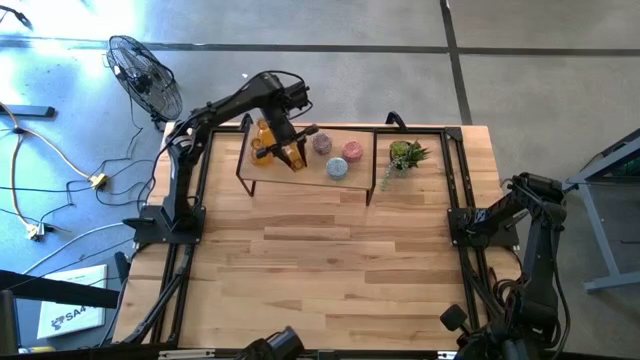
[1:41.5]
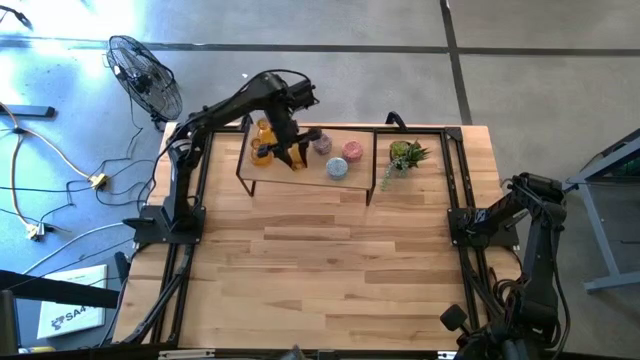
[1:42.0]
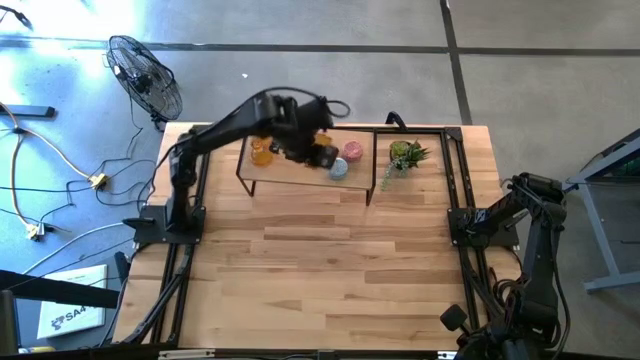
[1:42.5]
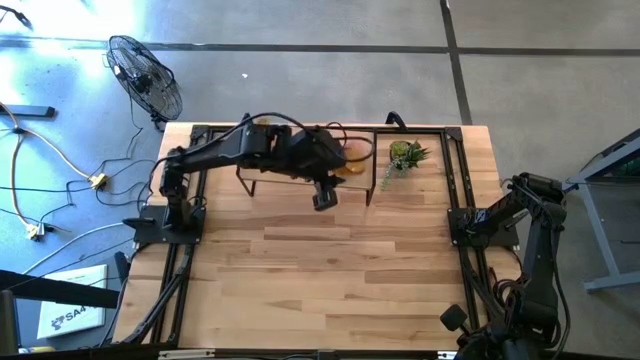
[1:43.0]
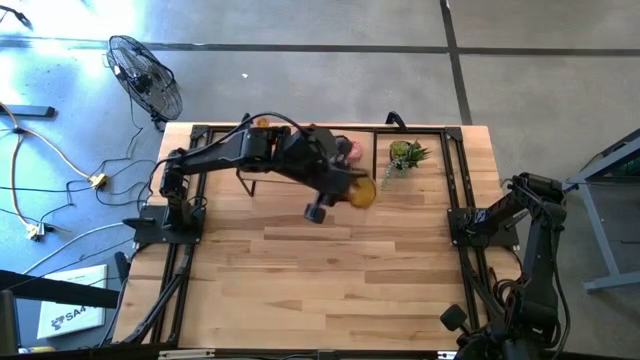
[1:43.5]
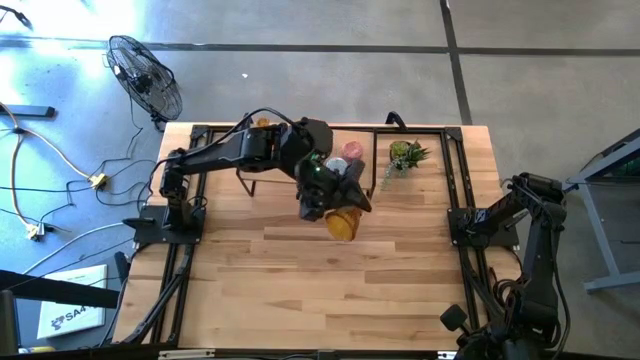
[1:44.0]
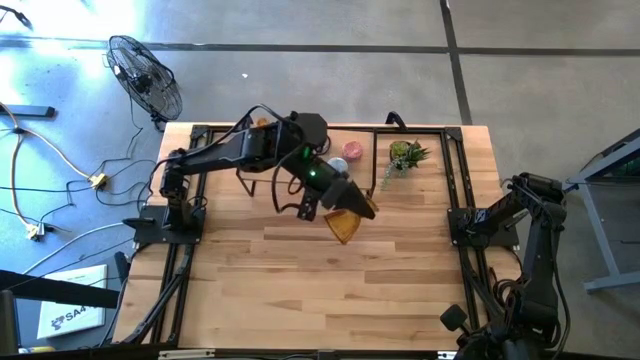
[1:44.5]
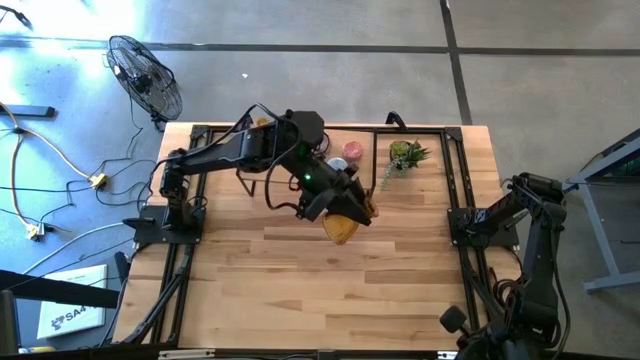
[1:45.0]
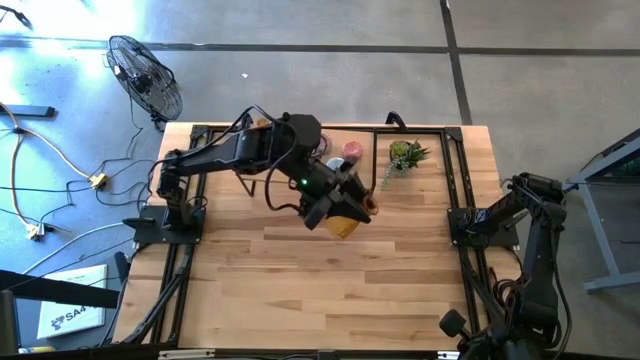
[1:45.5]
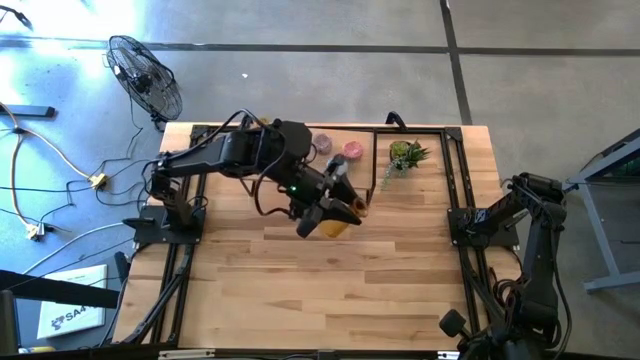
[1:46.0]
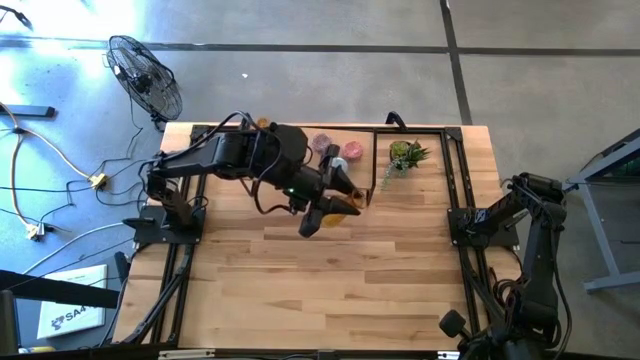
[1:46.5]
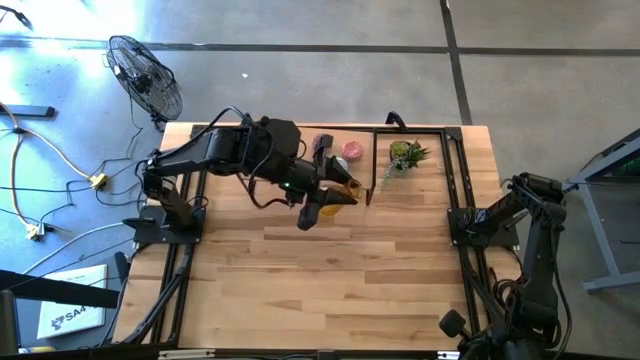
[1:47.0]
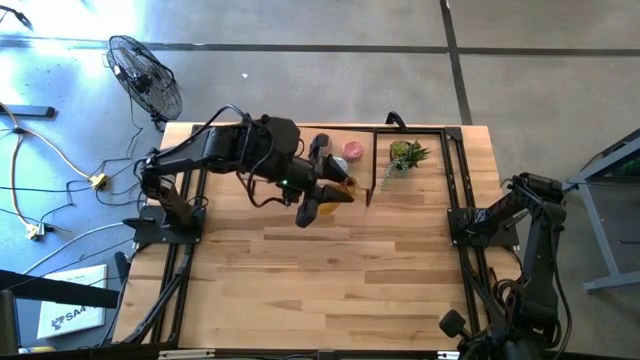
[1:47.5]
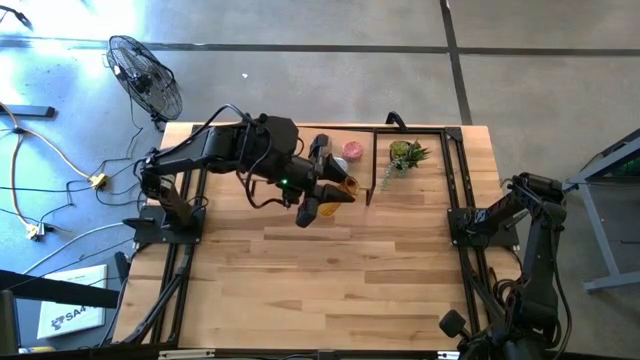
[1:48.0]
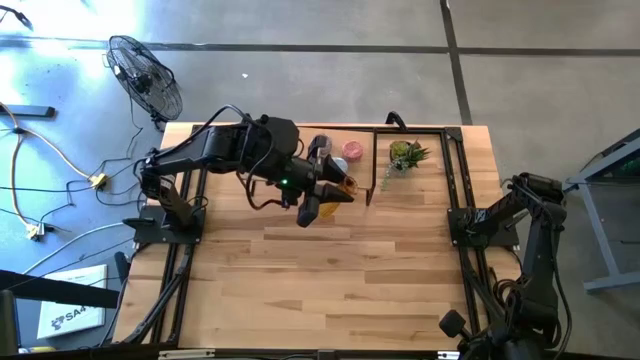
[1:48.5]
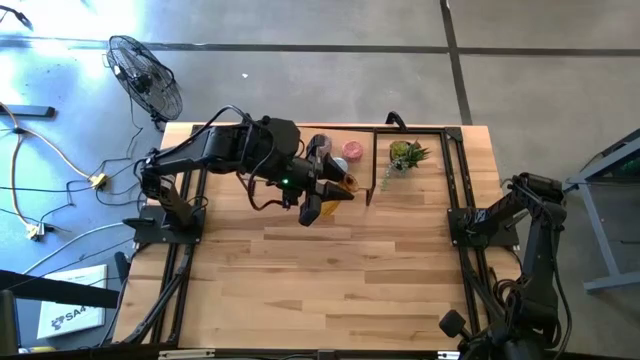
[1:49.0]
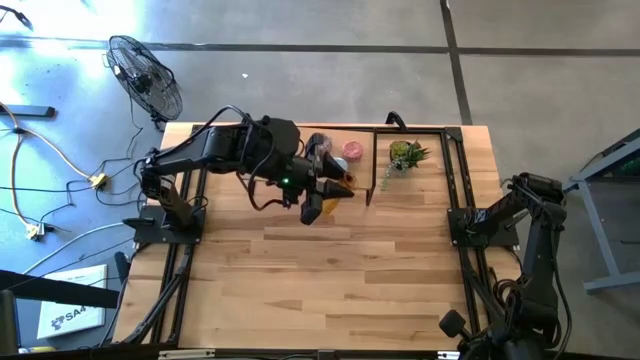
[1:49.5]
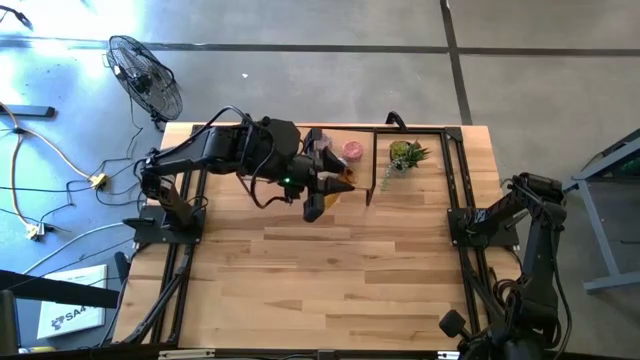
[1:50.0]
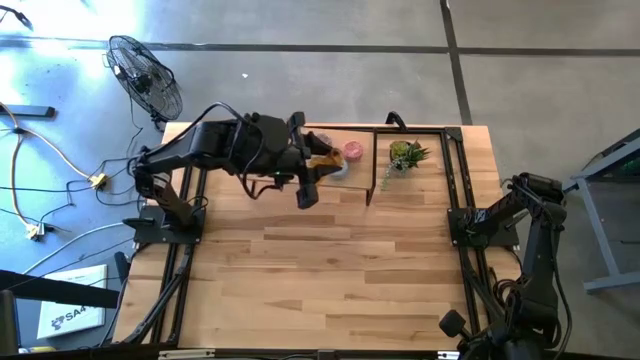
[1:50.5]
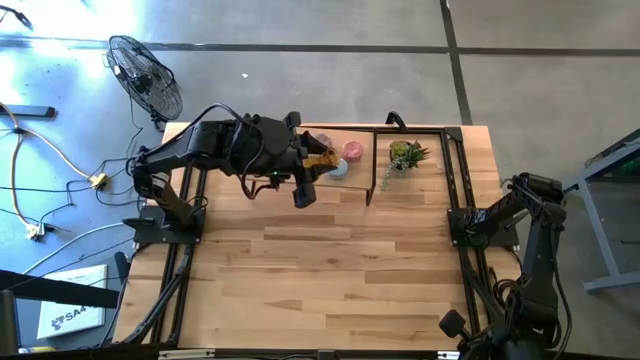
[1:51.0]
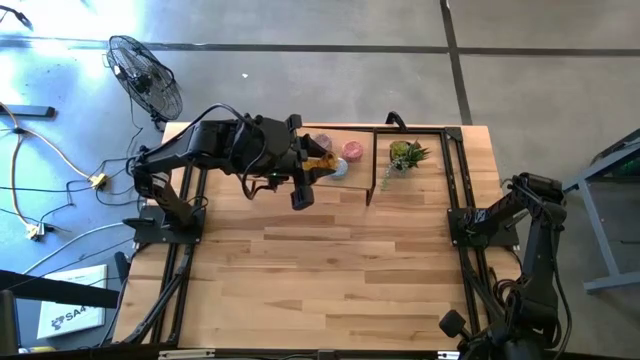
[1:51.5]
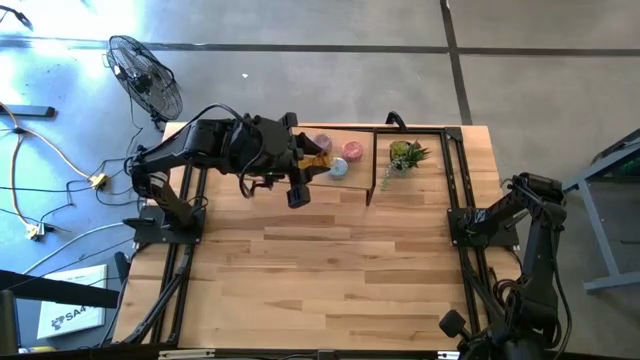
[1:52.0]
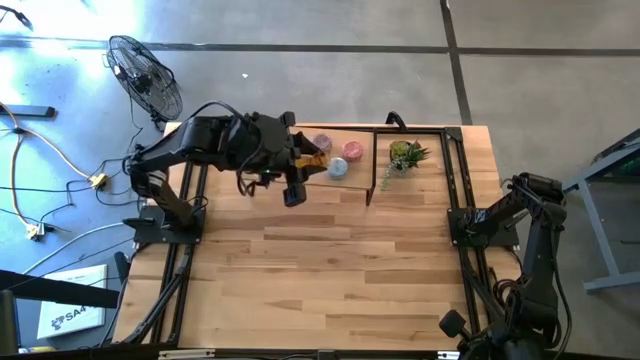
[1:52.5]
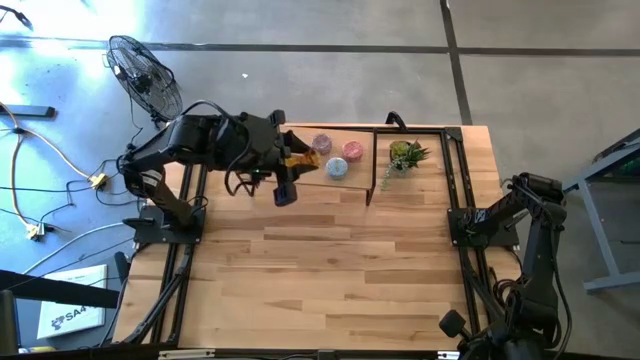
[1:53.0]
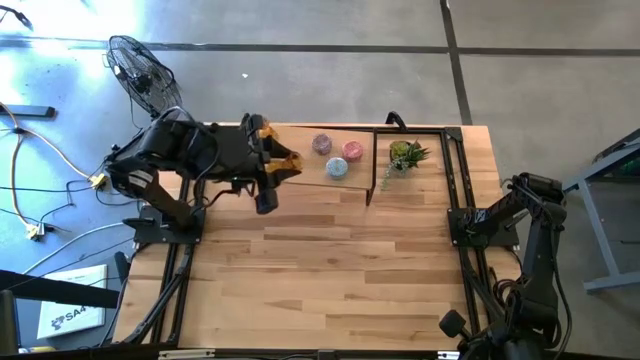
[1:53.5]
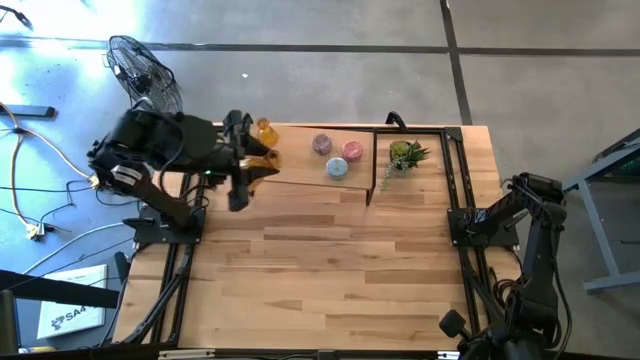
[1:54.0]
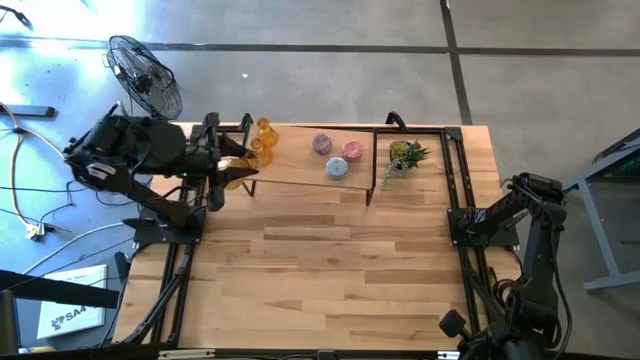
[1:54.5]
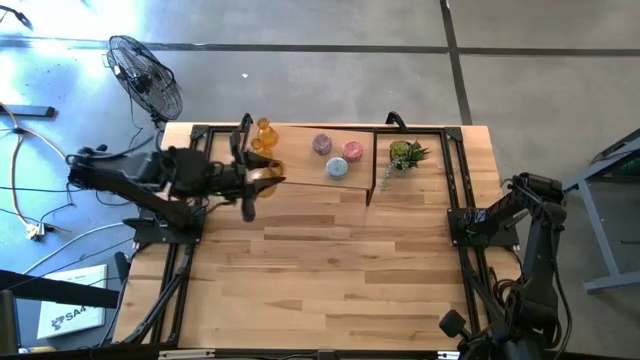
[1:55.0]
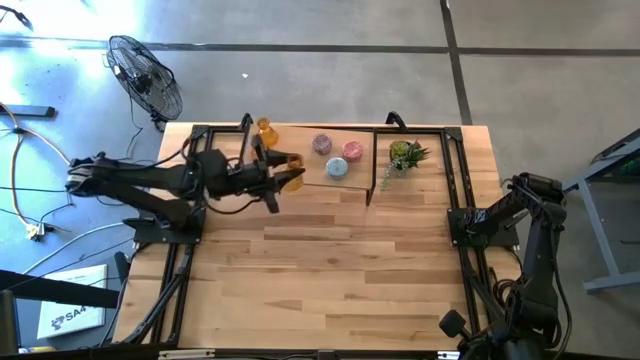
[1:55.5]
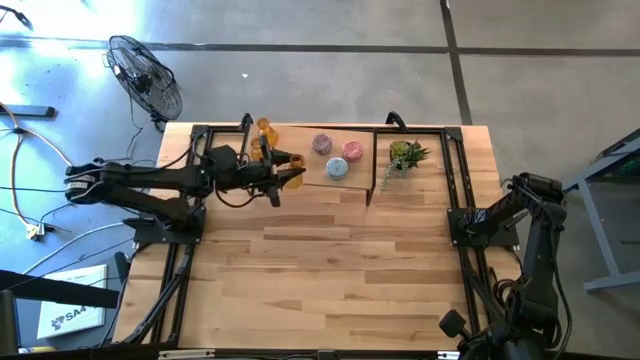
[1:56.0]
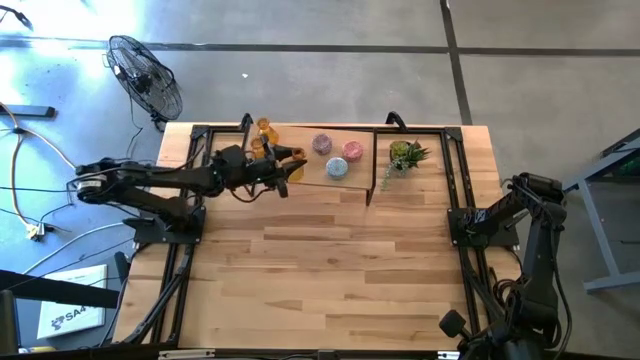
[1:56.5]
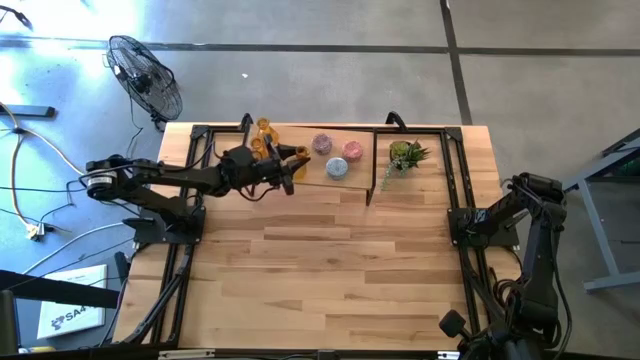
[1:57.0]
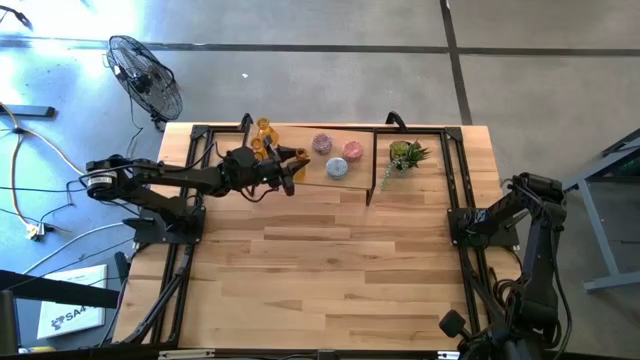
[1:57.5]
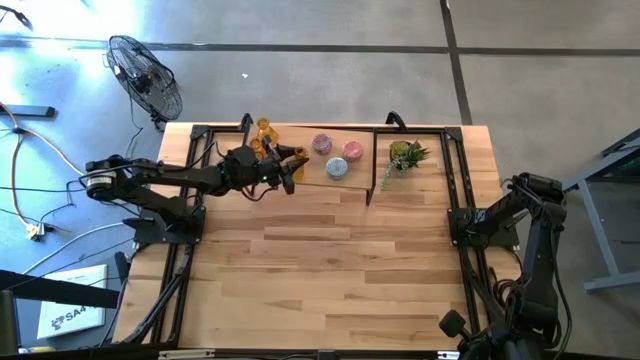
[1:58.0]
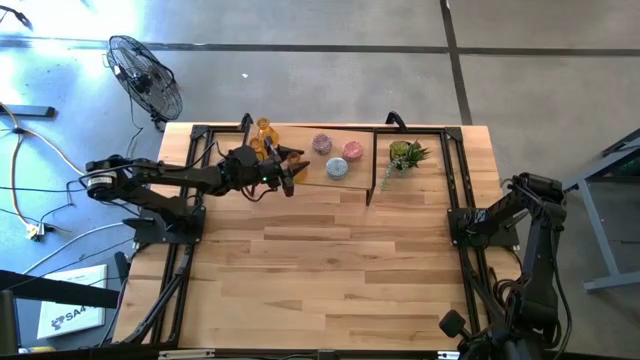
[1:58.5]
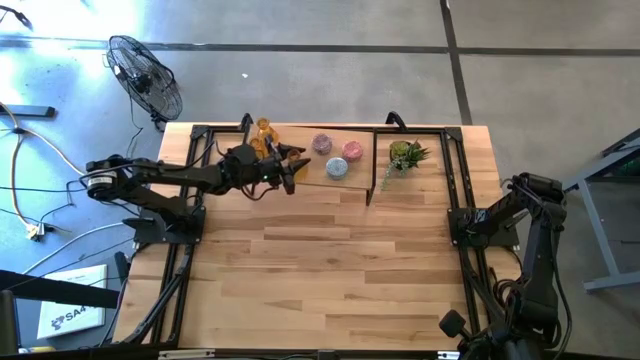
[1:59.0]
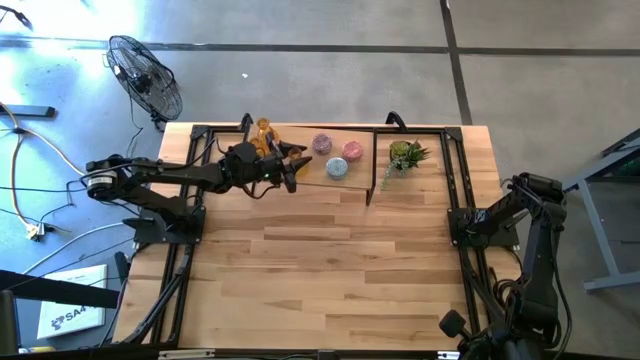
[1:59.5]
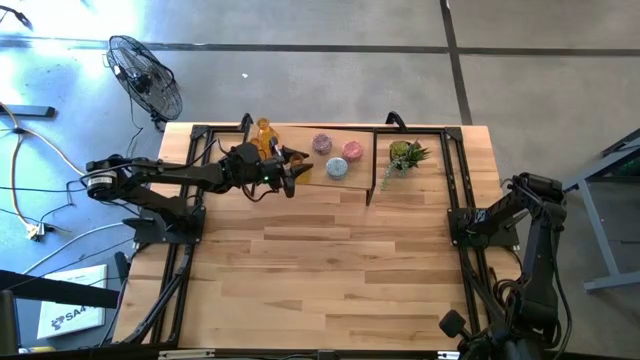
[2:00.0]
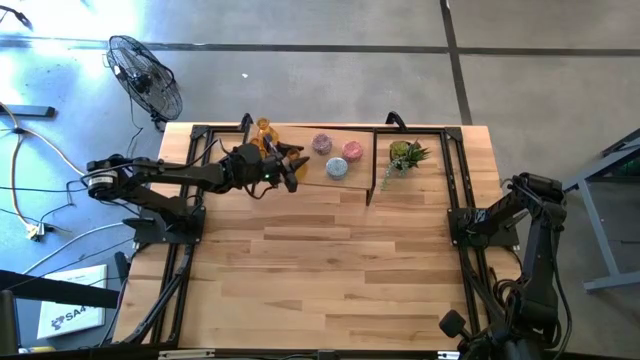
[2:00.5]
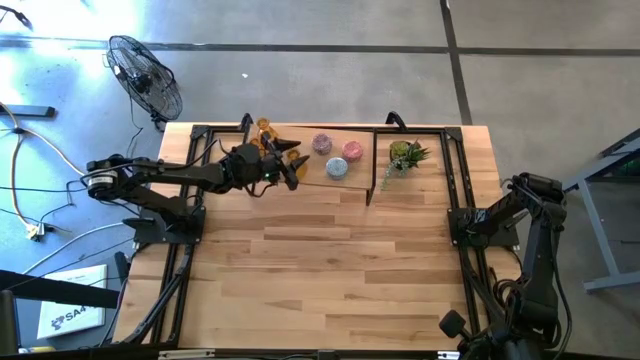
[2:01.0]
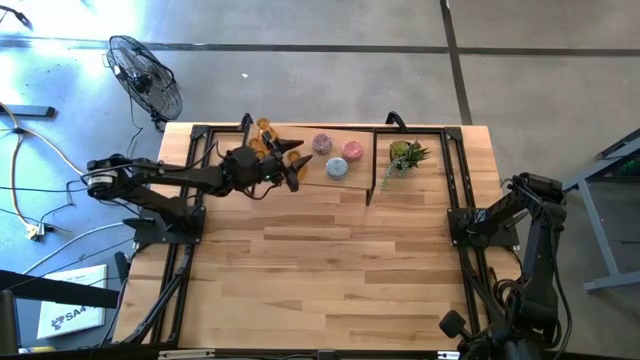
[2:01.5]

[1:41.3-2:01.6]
Task: Pick & Place candle stick holders
Put the yellow glass candle holder on the shelf
